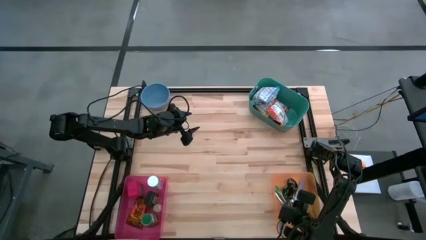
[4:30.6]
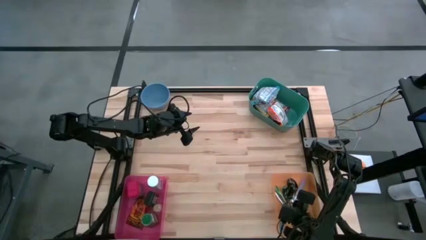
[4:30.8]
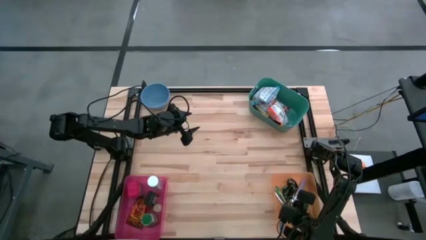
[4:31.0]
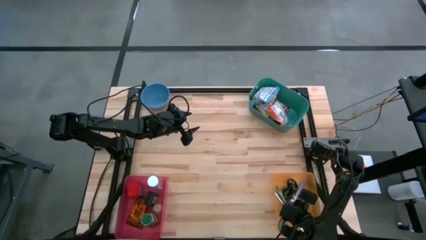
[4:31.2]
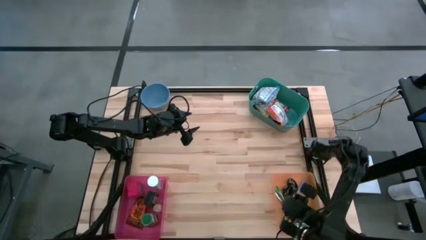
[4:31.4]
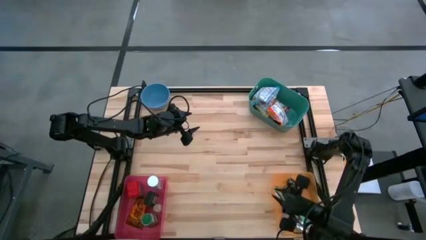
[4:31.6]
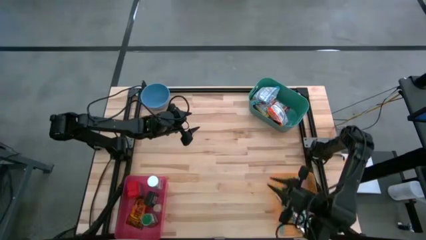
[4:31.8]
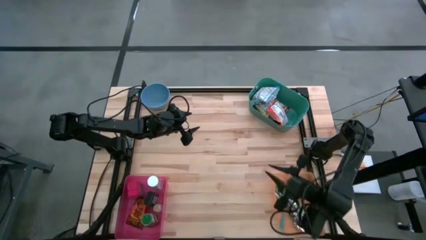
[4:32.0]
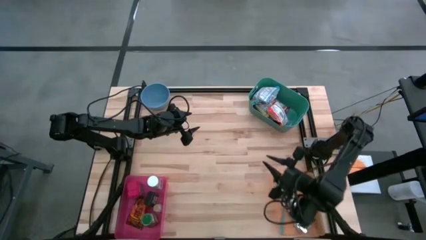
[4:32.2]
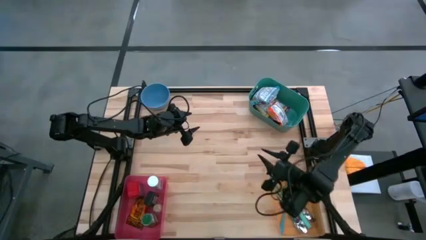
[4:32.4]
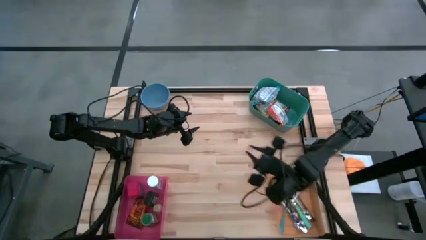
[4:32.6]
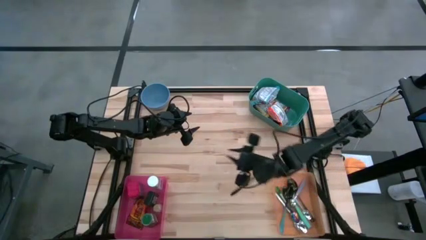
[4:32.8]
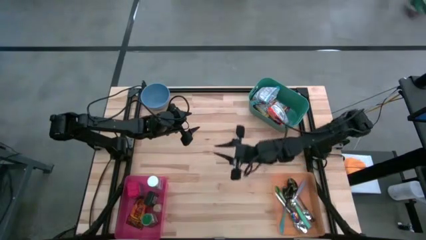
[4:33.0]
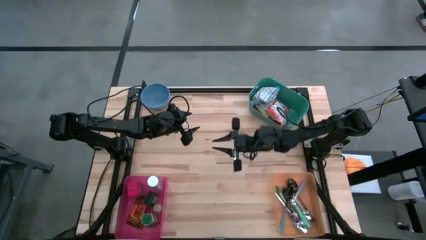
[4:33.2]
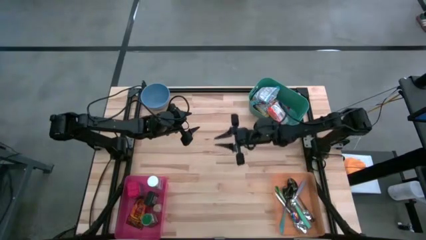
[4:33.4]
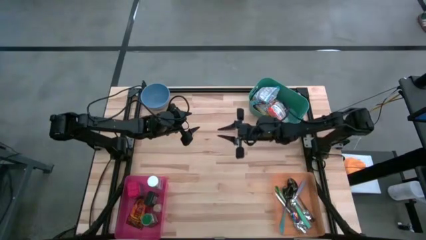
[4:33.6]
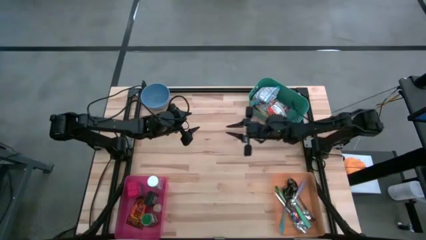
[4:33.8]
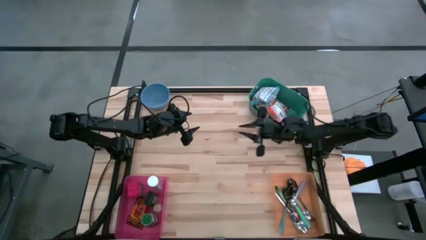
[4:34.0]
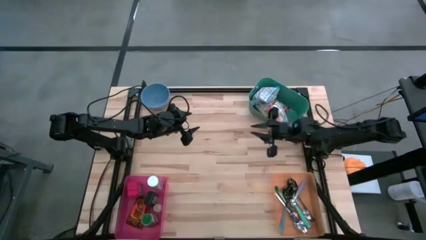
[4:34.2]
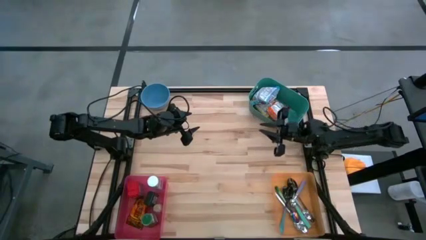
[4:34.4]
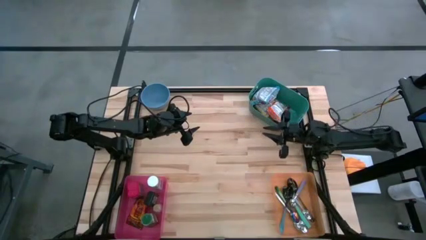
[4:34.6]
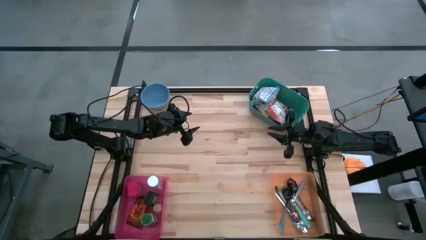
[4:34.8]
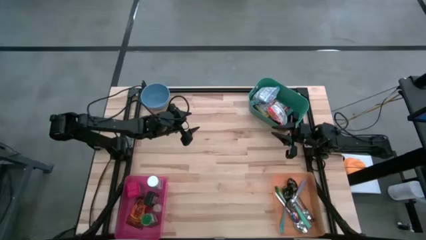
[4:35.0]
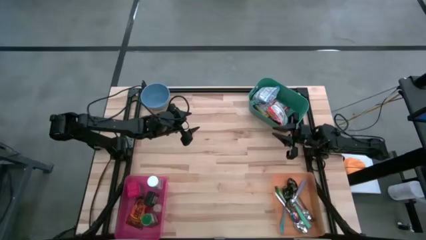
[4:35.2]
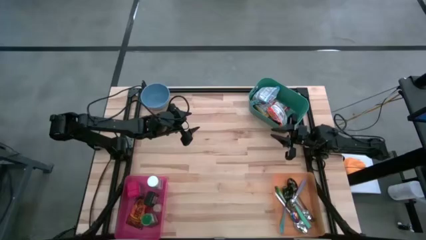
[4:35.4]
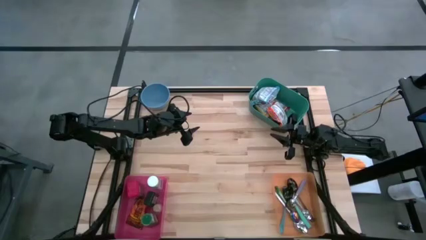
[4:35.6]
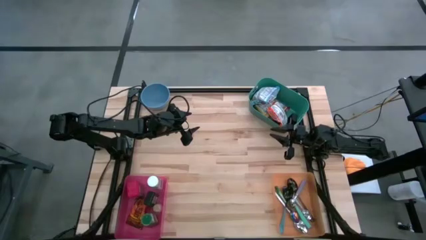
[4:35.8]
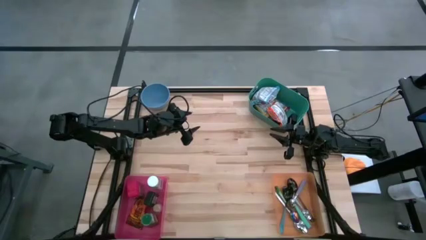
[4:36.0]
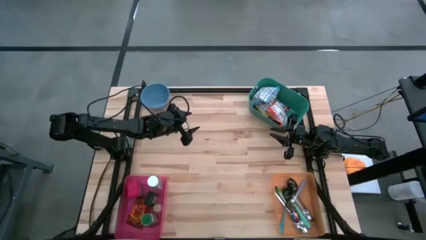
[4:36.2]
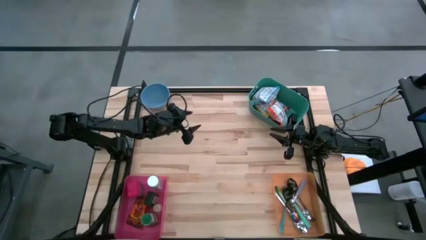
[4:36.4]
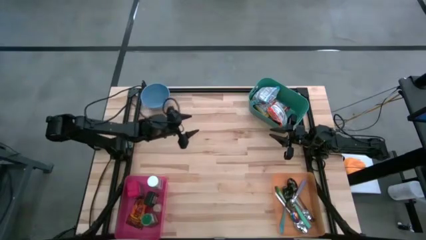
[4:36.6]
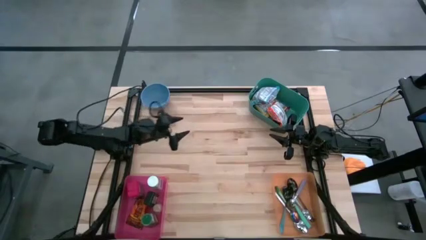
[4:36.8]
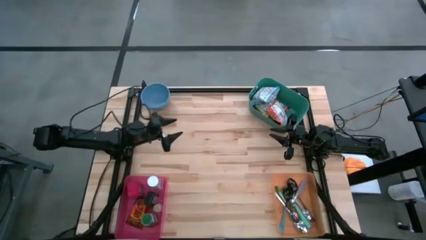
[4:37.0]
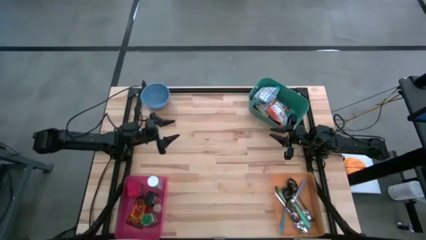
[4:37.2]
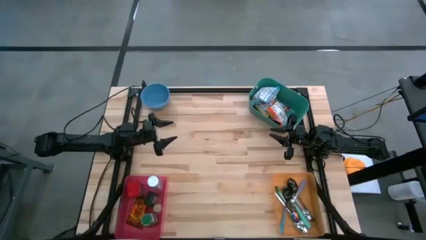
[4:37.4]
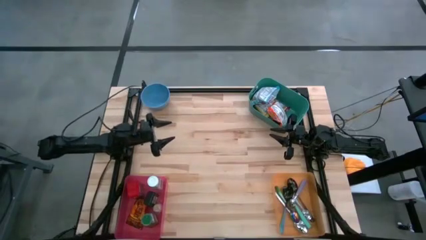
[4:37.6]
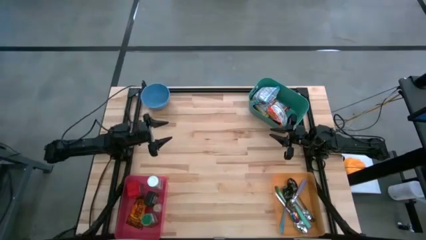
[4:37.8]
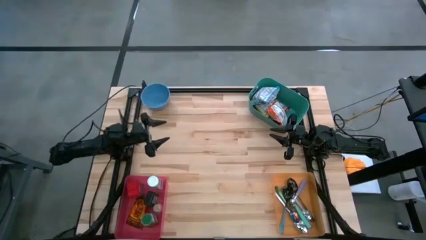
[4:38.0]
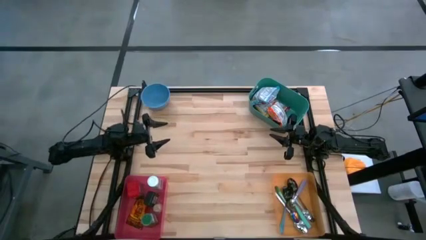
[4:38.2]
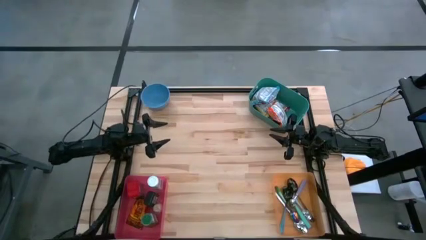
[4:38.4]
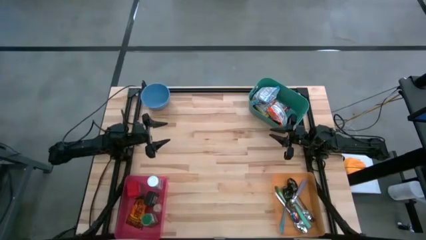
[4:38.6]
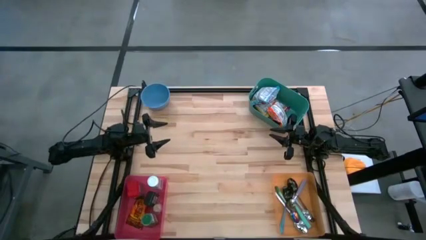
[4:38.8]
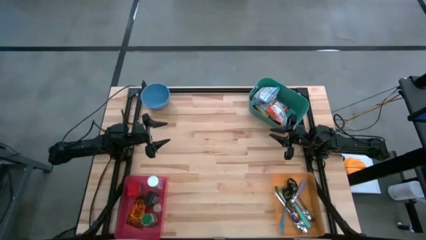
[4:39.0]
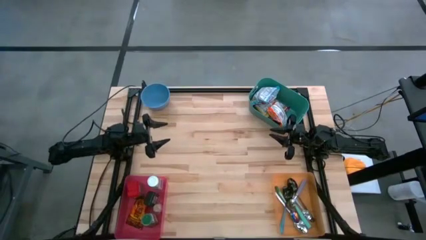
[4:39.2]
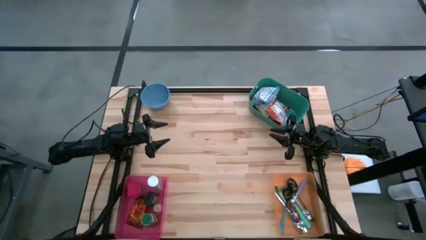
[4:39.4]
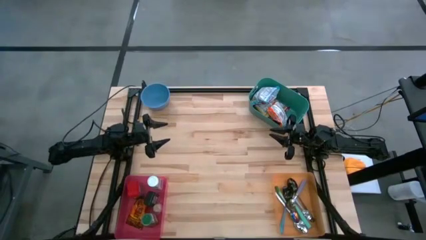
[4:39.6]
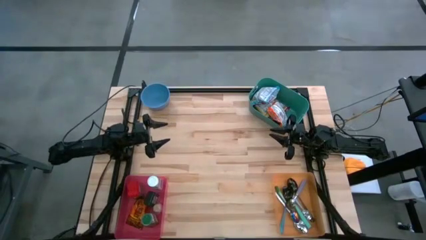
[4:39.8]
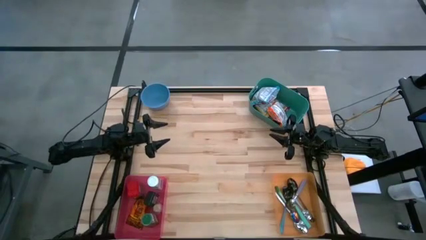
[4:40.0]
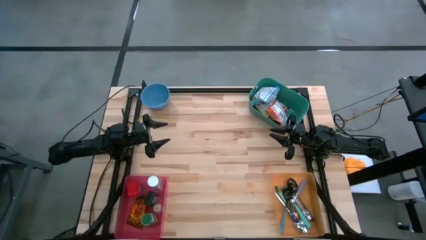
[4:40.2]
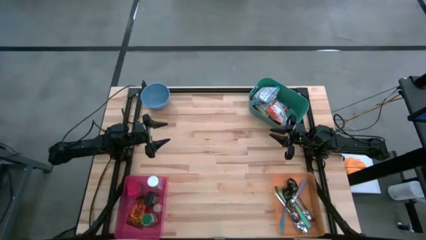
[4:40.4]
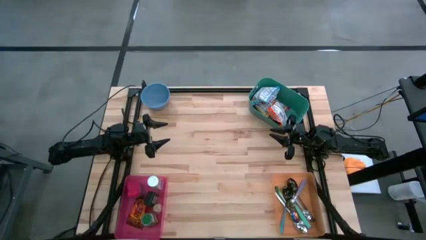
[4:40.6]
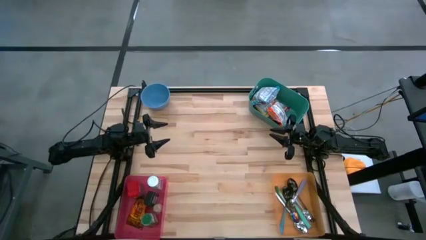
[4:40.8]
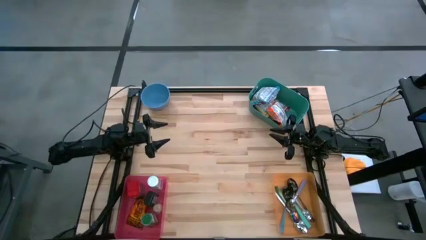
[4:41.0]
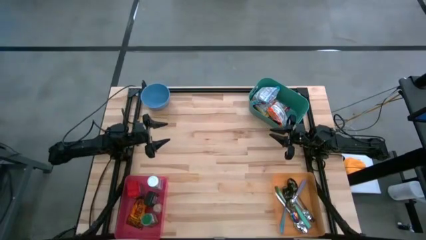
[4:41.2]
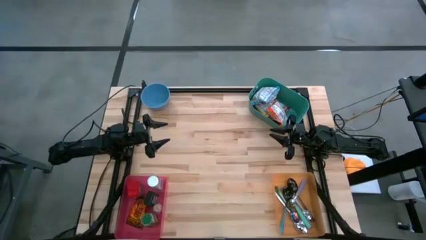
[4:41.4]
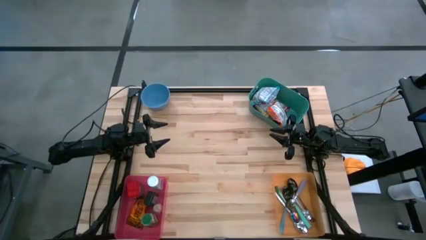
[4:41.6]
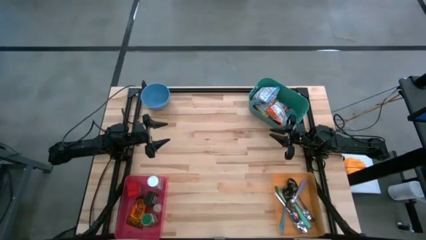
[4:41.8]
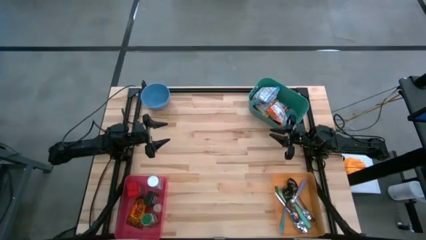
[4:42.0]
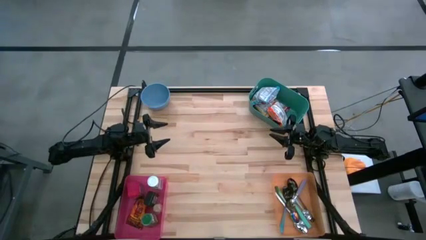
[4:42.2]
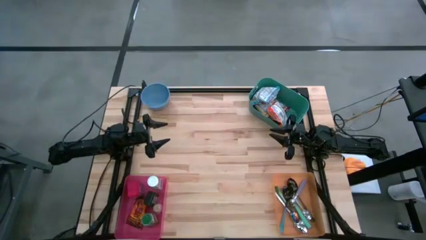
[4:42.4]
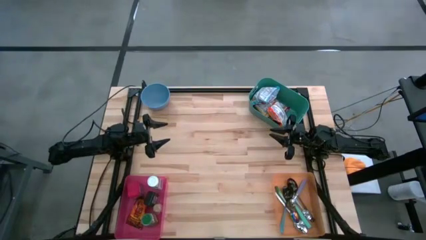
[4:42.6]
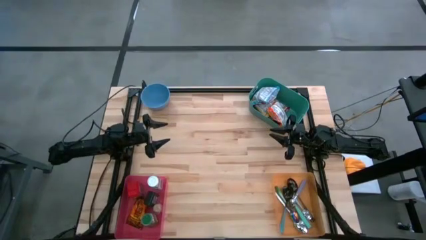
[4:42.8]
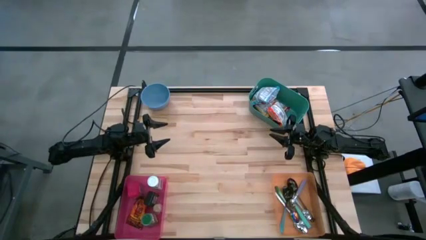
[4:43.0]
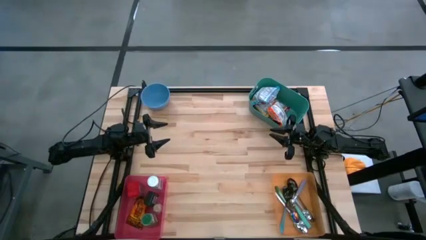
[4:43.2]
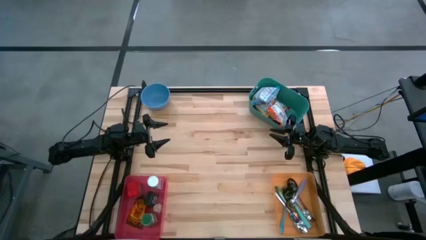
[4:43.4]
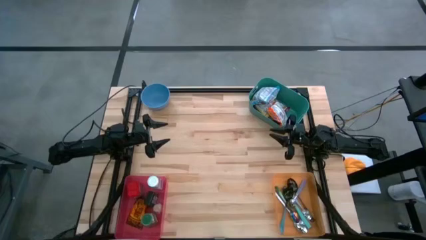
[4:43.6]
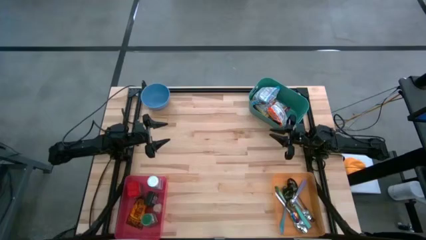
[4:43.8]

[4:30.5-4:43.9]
Return to Home Position
